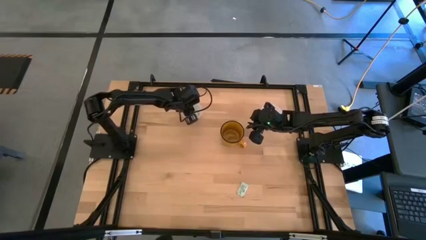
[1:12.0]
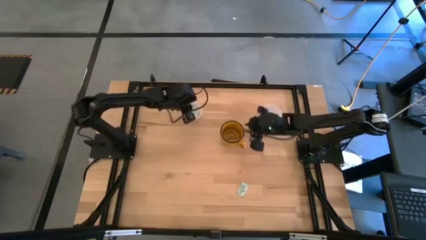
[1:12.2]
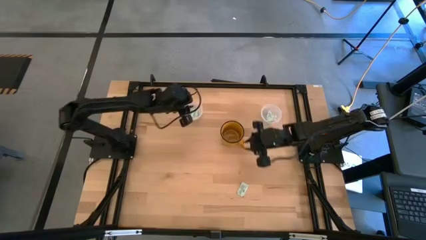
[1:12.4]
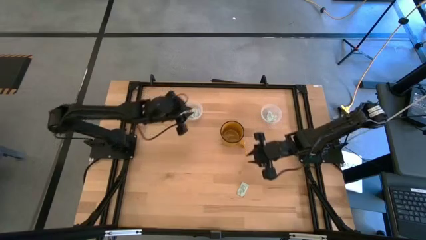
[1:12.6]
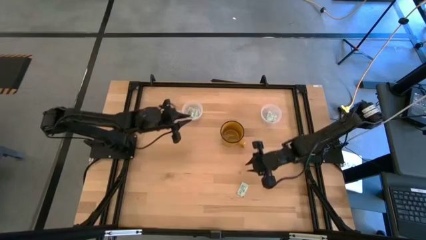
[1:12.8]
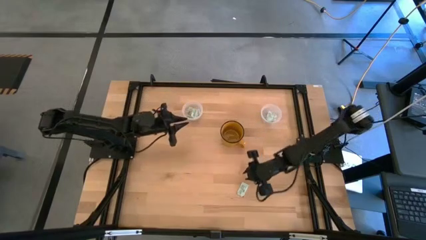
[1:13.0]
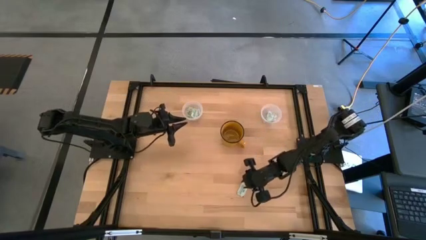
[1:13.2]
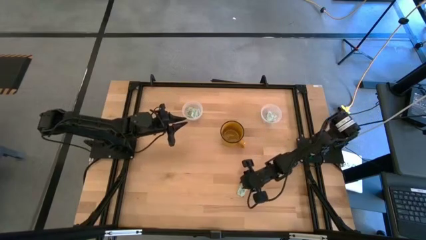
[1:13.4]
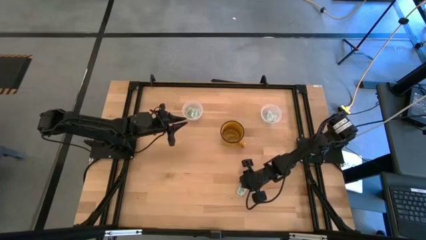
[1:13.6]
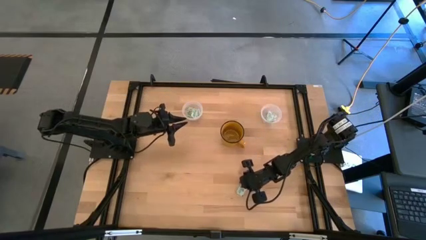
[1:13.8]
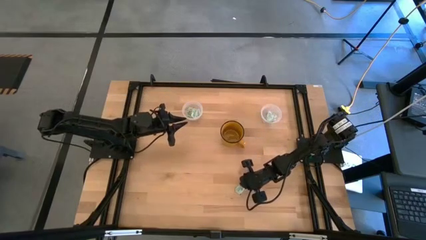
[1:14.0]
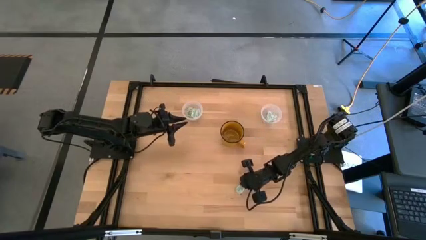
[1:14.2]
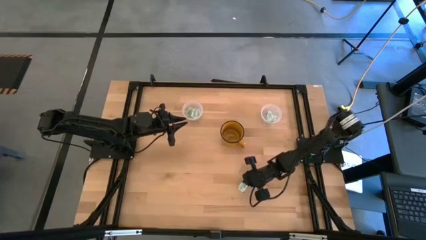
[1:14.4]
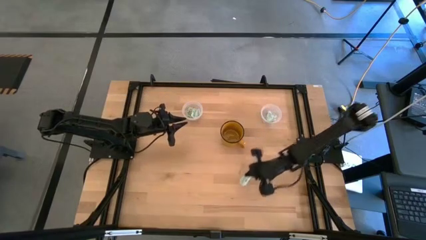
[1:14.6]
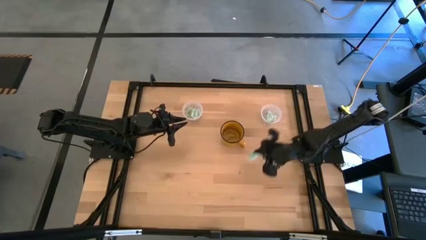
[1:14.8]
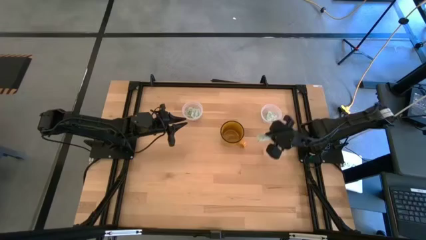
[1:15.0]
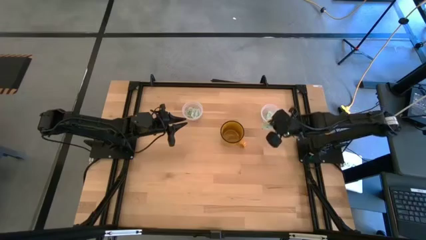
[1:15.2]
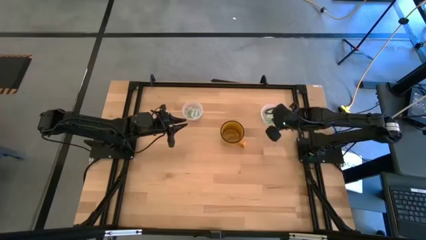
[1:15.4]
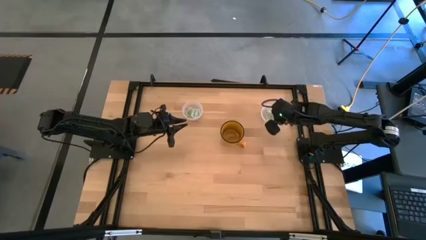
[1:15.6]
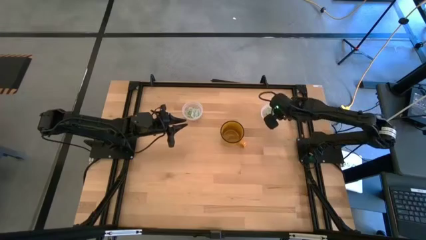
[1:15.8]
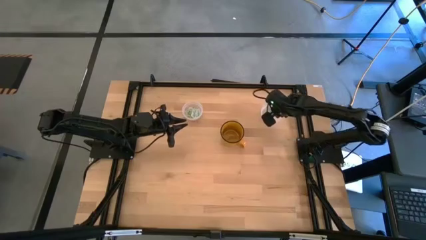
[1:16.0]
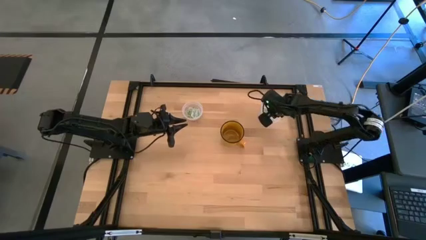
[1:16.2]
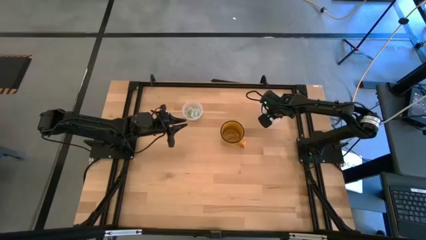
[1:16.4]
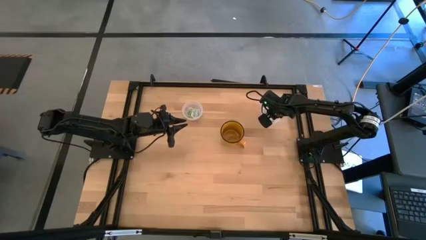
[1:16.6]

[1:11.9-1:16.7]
Task: Pick and place Stevia / Truvia into bins
Put the white stevia packet into the right transparent container

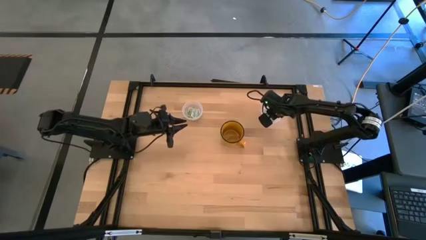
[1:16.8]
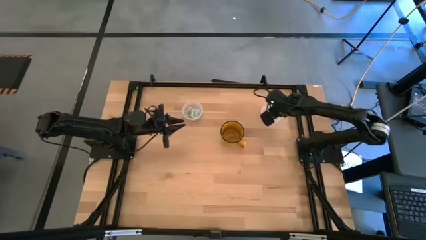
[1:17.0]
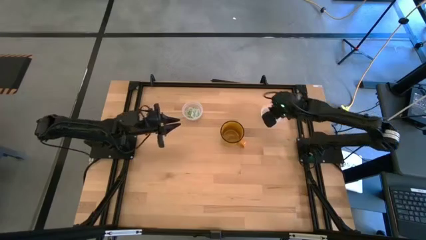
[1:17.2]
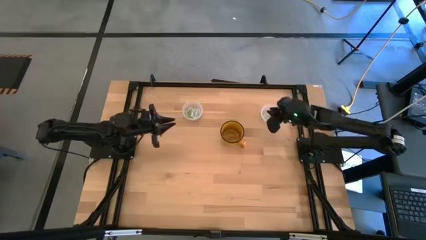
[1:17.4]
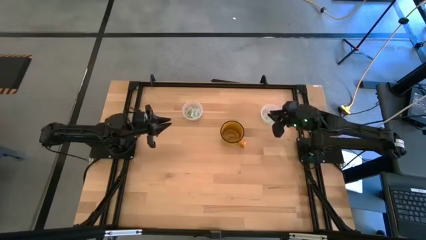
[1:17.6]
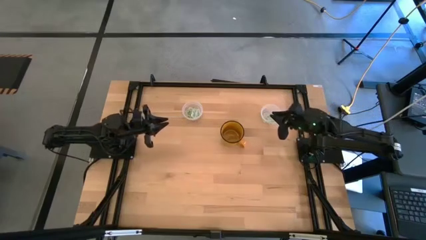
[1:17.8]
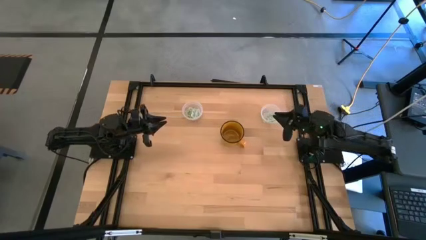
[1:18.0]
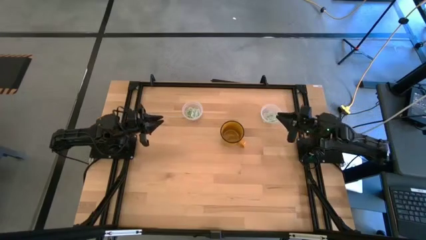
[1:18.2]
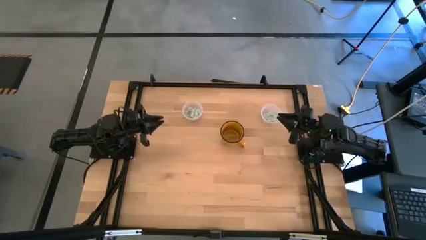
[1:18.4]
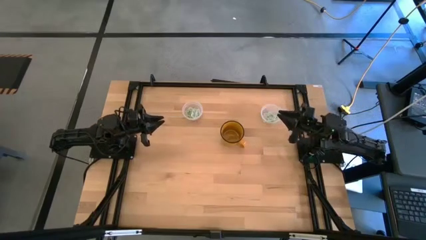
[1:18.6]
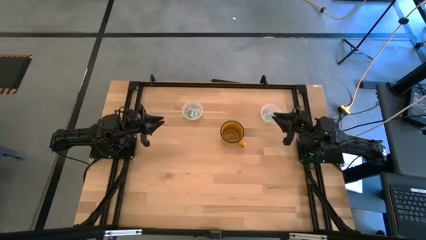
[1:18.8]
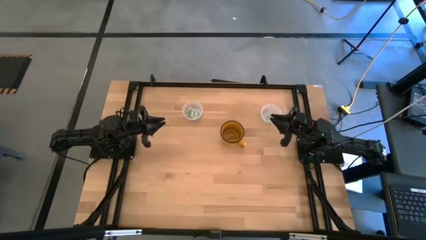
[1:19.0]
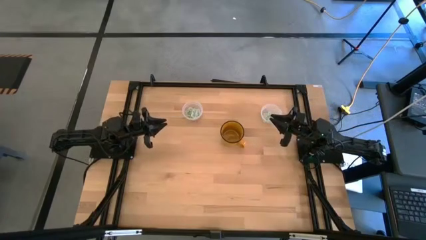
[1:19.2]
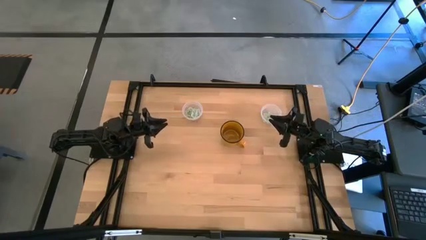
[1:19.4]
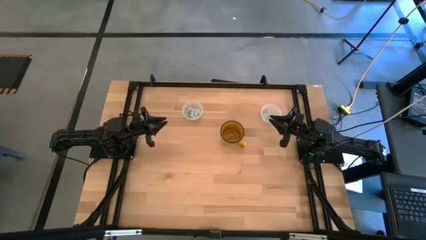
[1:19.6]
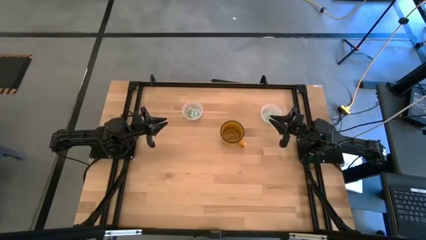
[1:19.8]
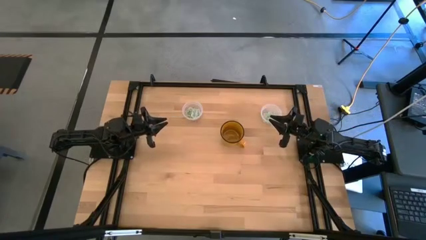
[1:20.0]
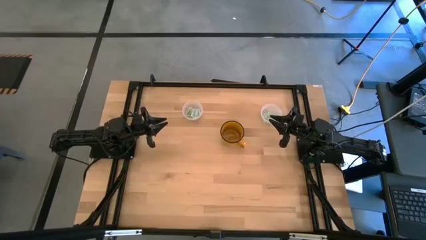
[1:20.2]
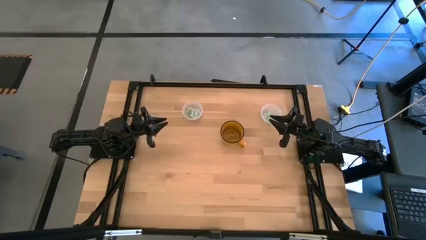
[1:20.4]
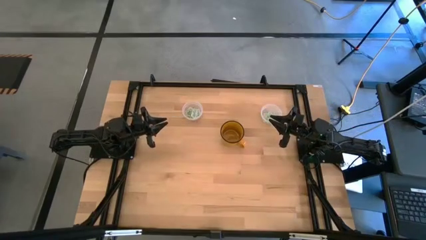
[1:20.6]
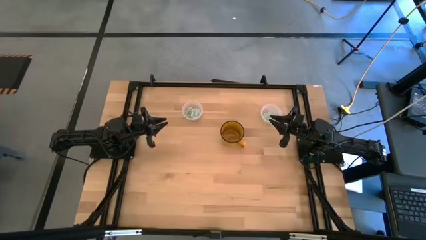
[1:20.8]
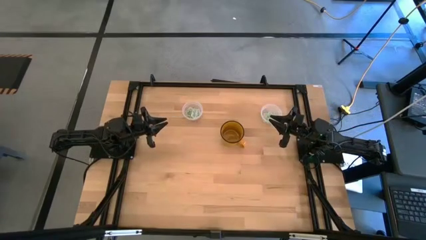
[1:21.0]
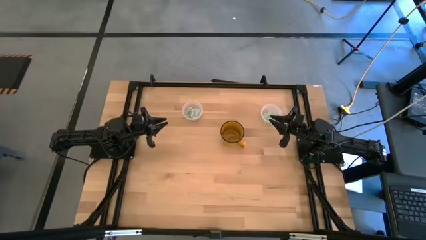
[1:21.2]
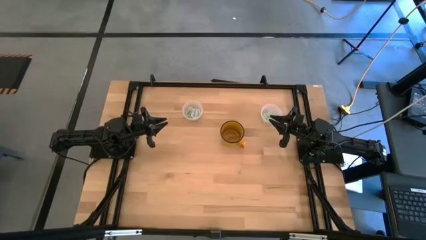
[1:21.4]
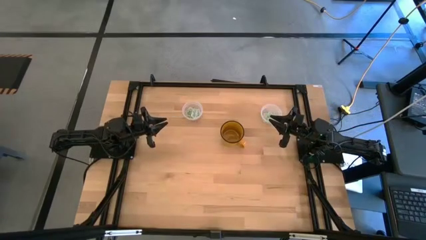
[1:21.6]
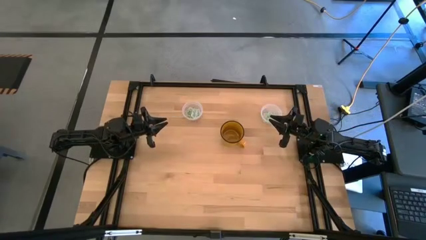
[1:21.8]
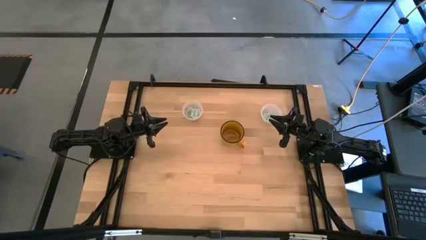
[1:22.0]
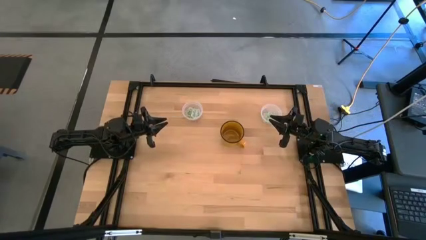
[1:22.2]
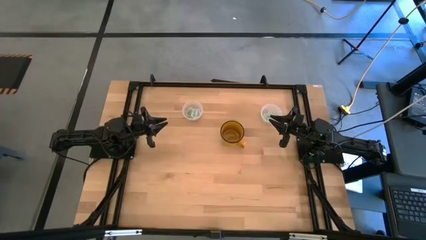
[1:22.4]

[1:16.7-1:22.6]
Return to Home Position

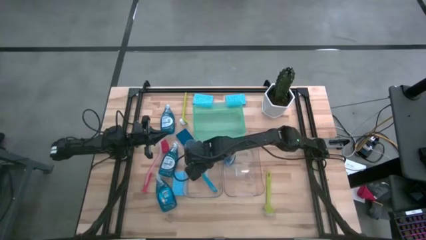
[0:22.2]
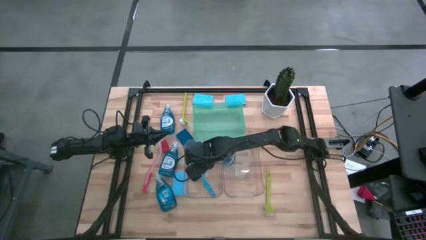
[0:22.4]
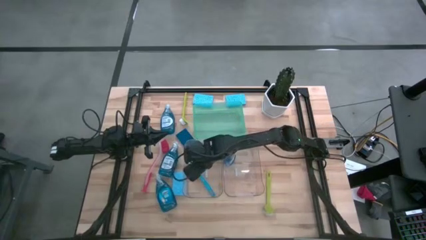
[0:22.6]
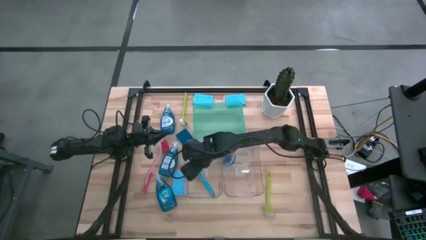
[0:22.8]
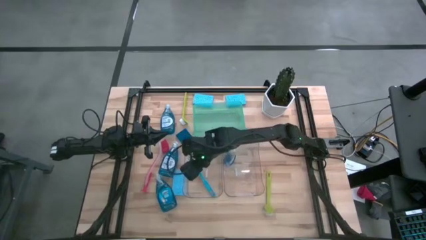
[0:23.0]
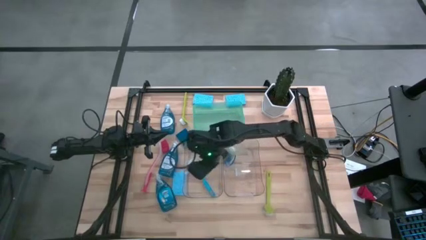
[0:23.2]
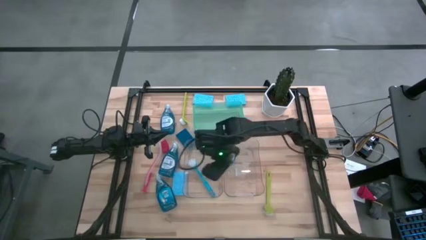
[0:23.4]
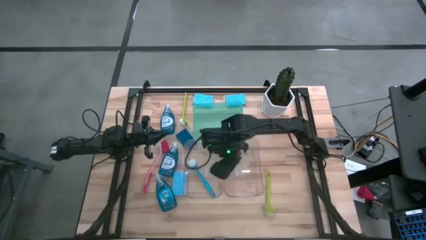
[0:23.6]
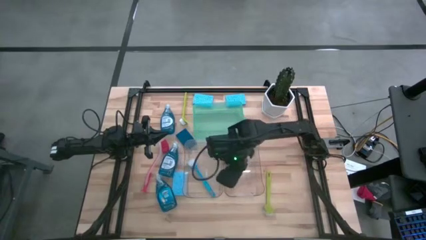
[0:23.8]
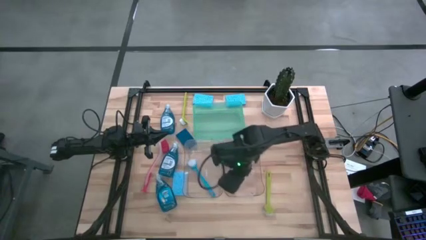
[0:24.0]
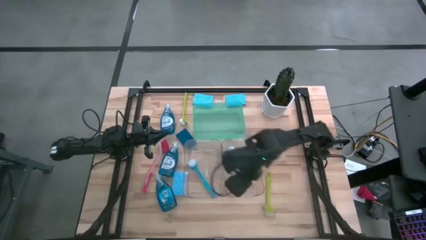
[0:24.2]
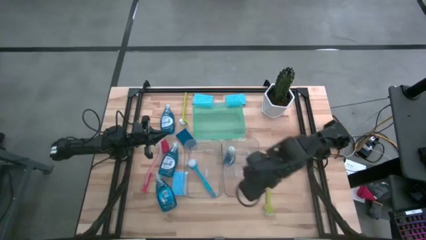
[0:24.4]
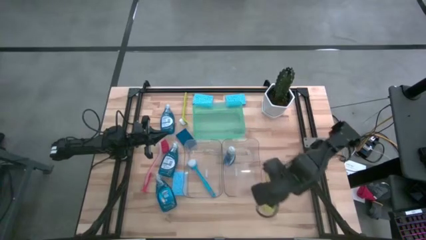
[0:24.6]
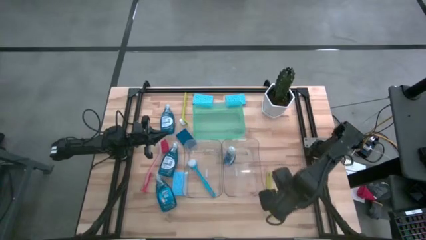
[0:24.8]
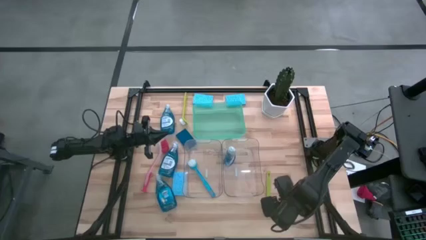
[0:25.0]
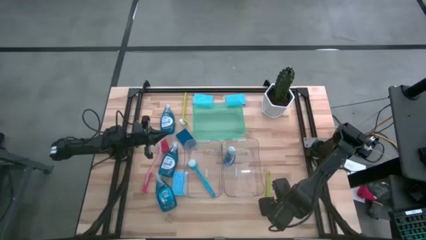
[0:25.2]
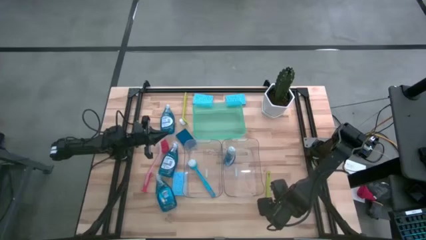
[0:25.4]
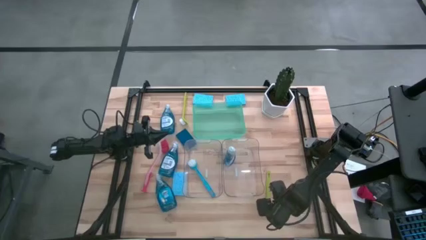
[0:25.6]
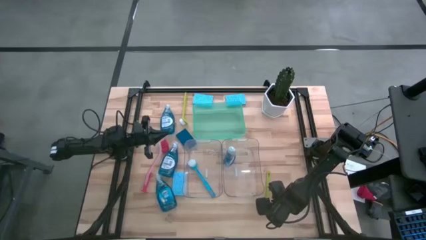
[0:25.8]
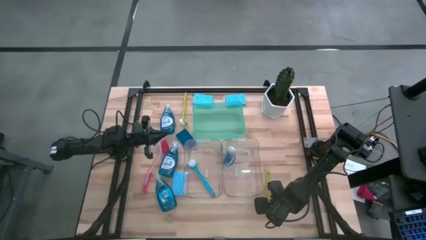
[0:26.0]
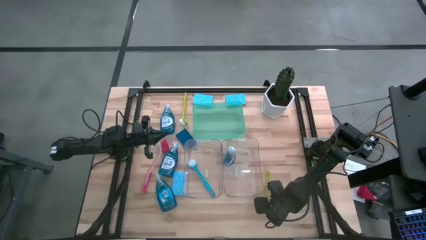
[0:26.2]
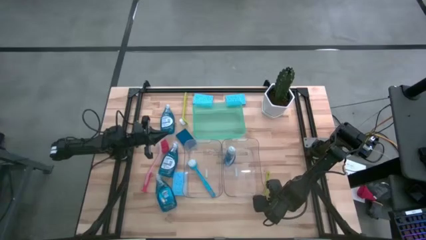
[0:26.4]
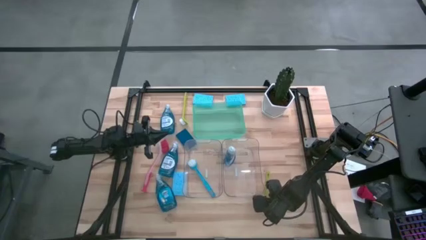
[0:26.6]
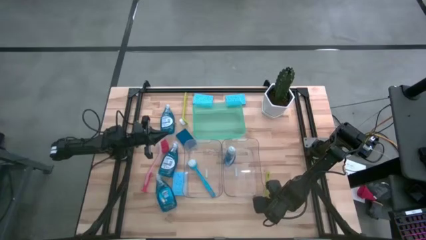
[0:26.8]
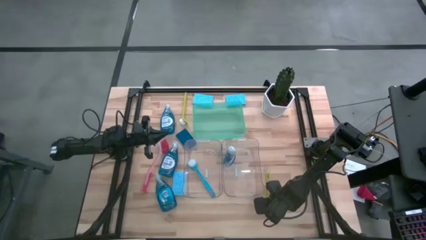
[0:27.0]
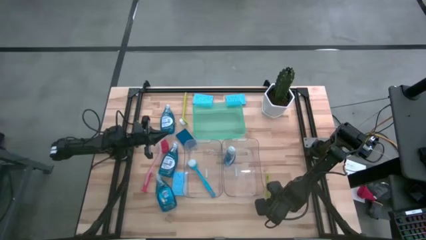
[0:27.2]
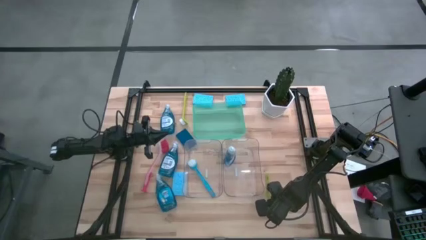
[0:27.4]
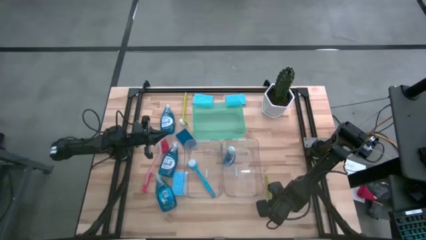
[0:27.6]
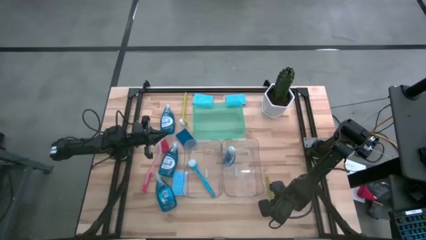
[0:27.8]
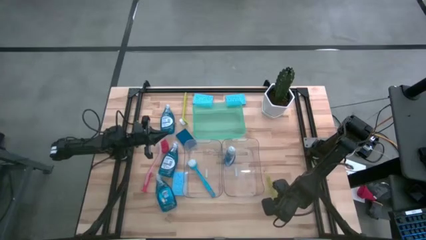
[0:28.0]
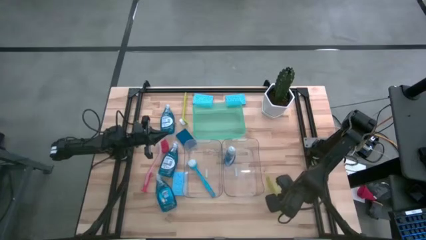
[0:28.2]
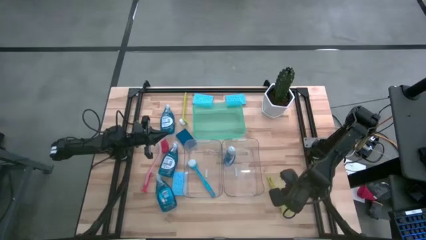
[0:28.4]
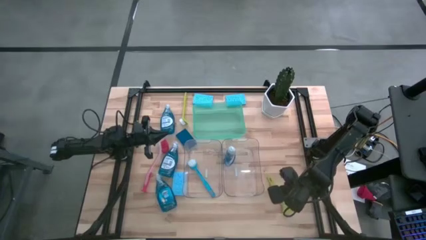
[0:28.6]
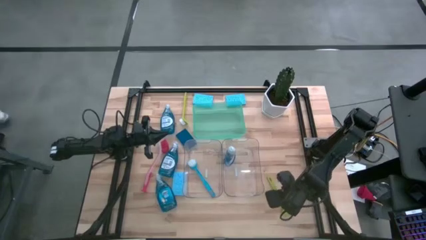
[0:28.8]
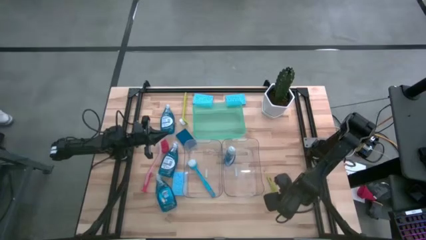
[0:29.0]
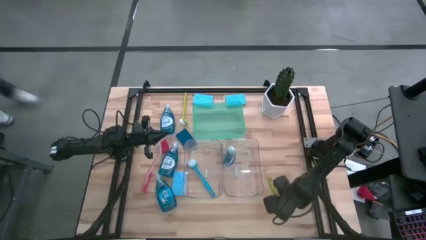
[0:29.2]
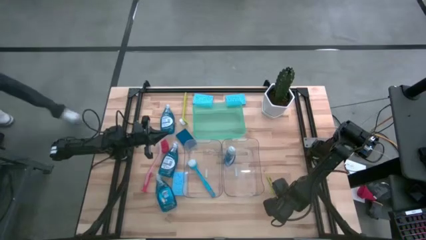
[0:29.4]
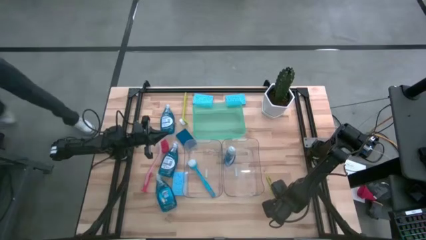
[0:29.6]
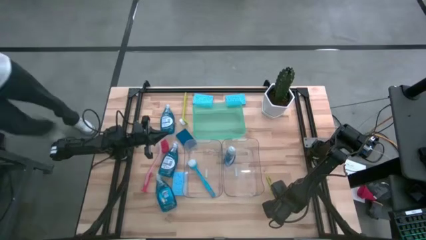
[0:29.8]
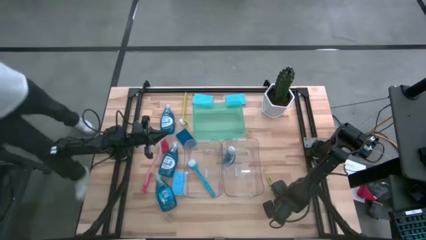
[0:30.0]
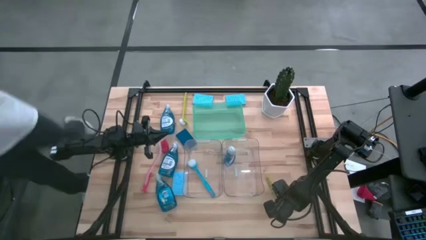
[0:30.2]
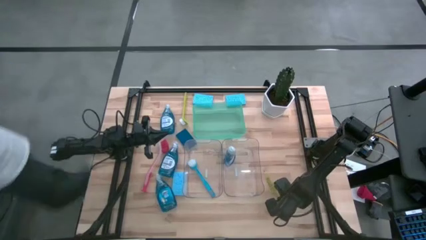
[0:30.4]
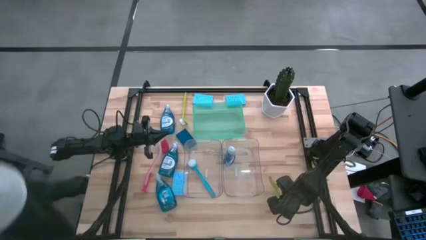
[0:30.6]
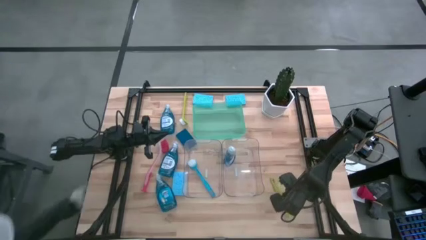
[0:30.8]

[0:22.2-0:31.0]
Task: Pick & Place Kitchen Sink Supplies
Put the yellow toilet brush into the left transparent bin
